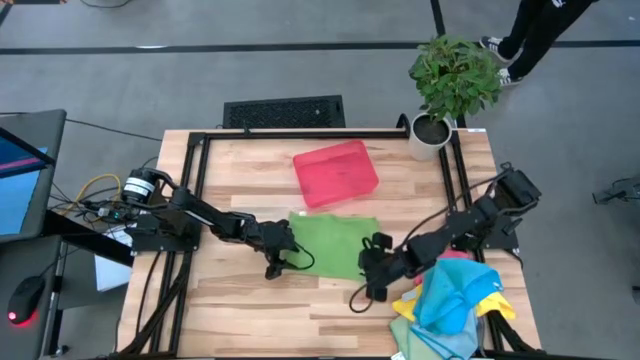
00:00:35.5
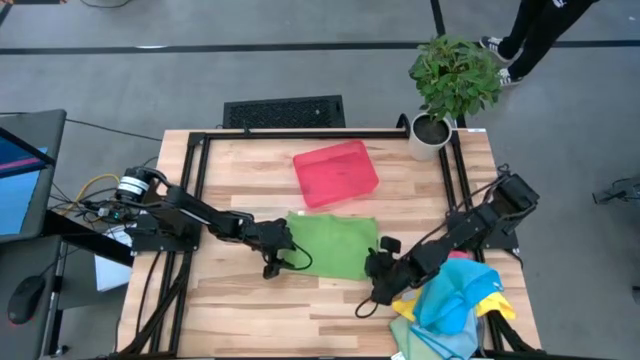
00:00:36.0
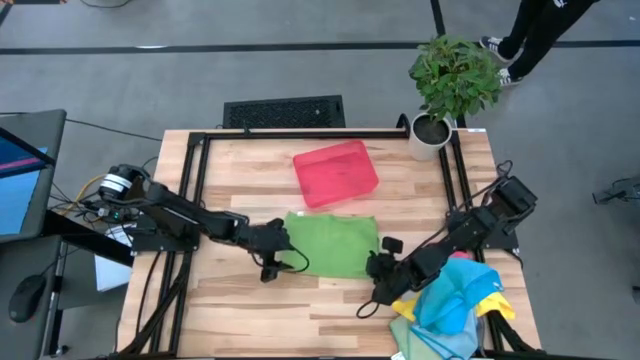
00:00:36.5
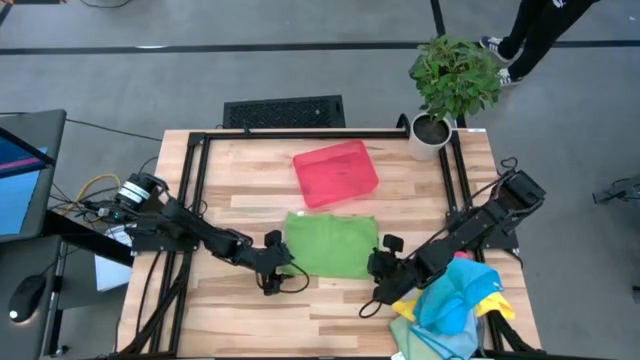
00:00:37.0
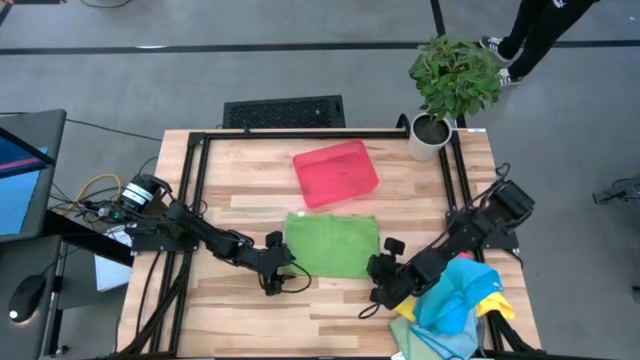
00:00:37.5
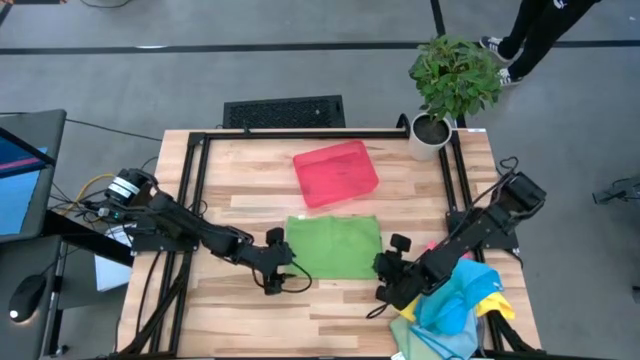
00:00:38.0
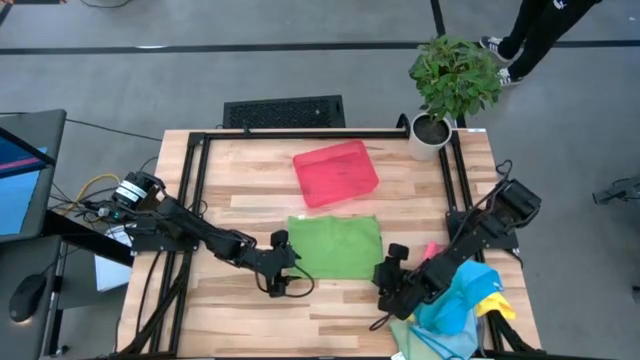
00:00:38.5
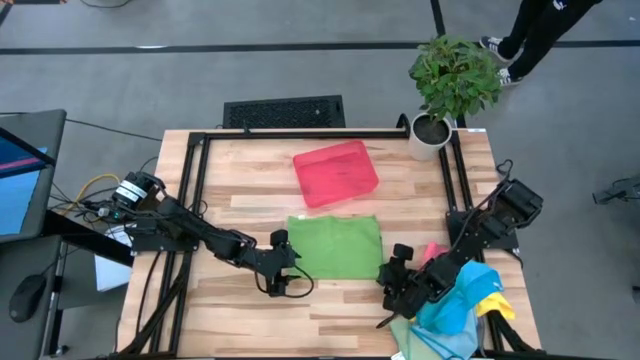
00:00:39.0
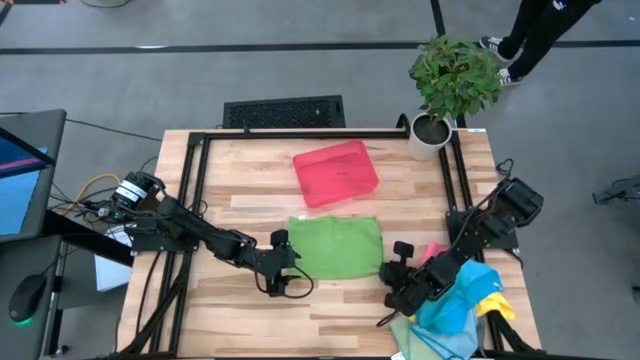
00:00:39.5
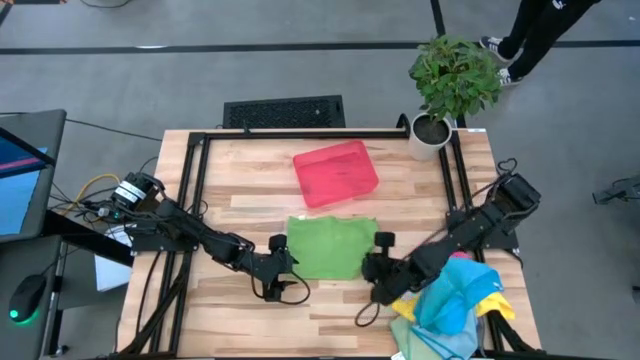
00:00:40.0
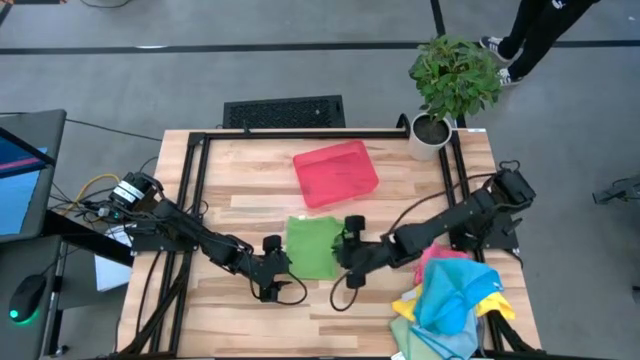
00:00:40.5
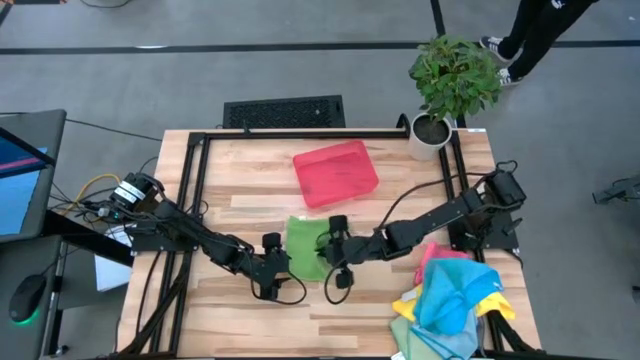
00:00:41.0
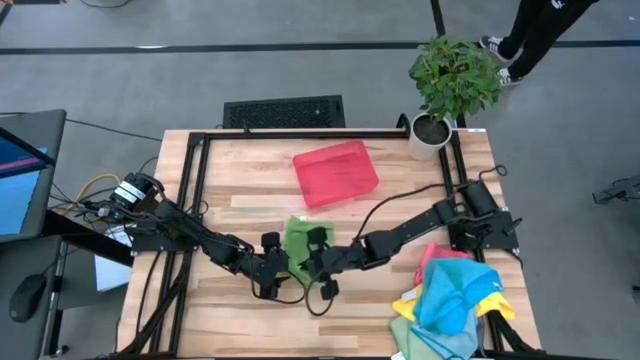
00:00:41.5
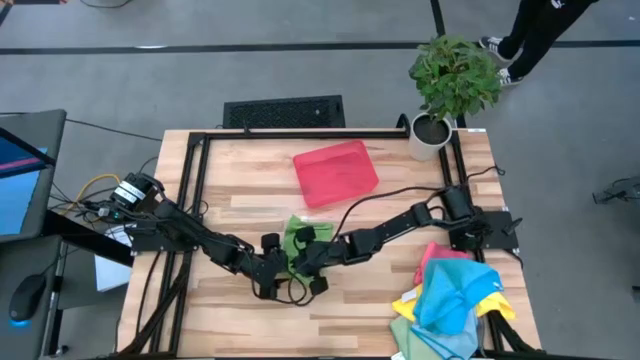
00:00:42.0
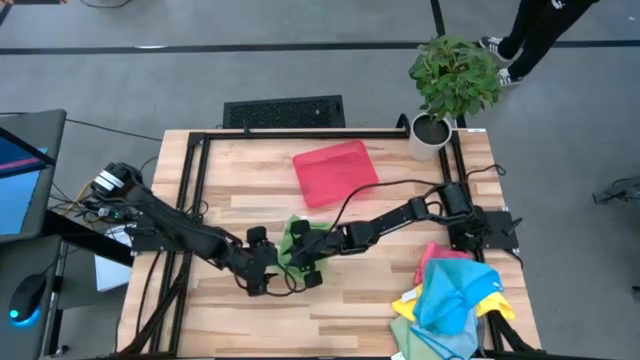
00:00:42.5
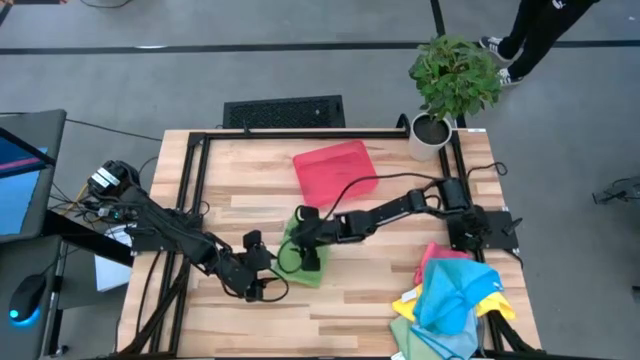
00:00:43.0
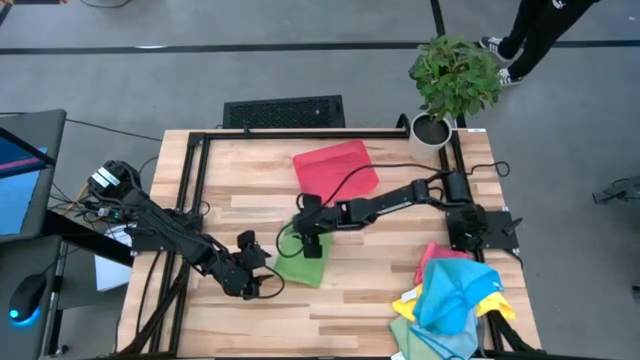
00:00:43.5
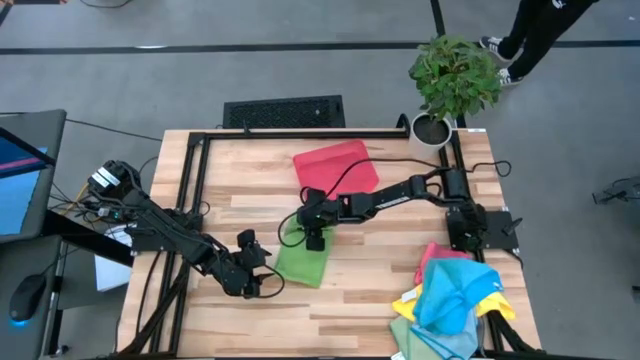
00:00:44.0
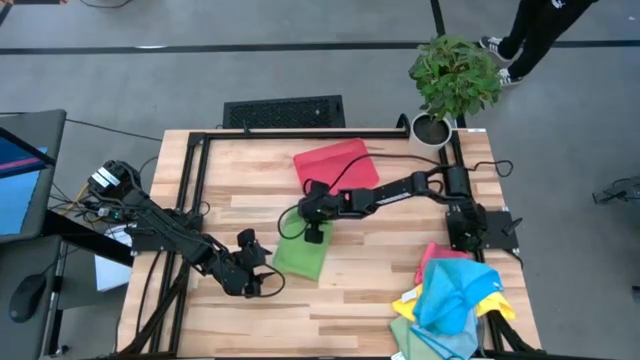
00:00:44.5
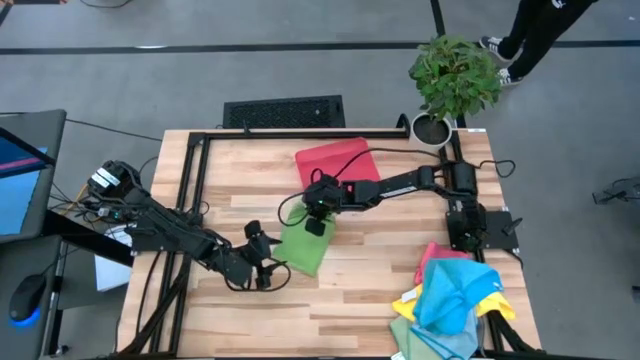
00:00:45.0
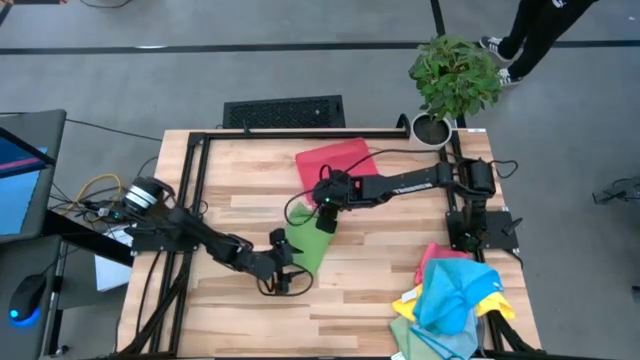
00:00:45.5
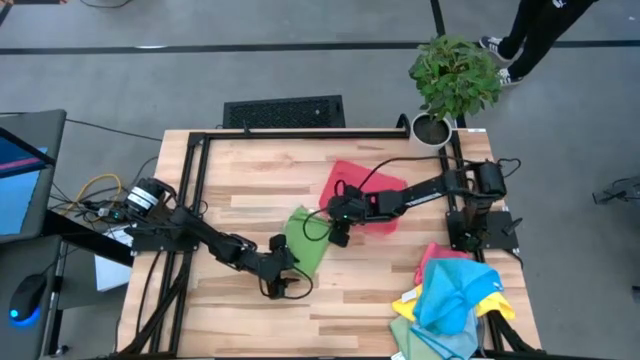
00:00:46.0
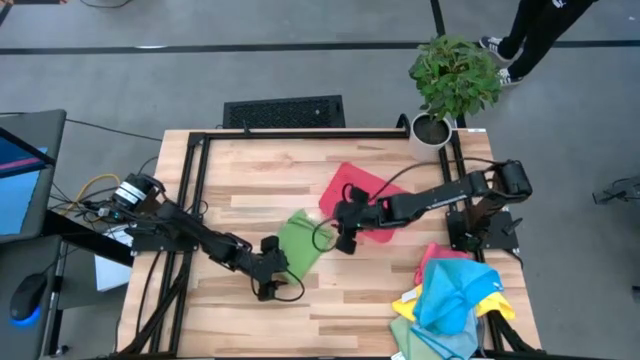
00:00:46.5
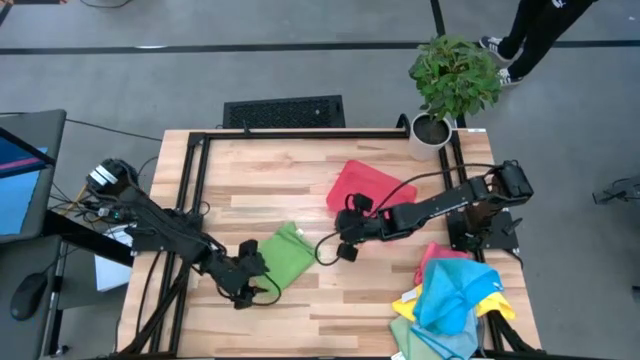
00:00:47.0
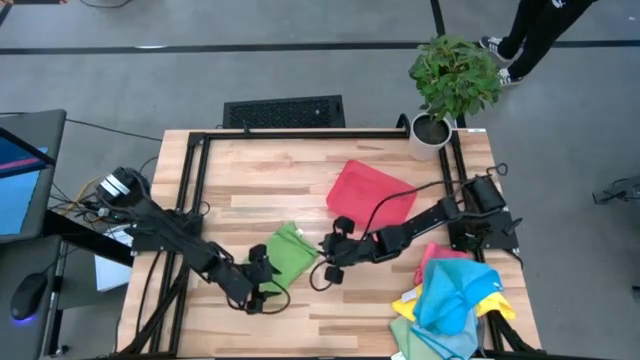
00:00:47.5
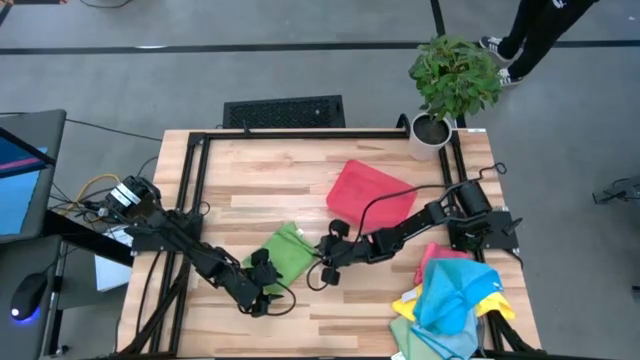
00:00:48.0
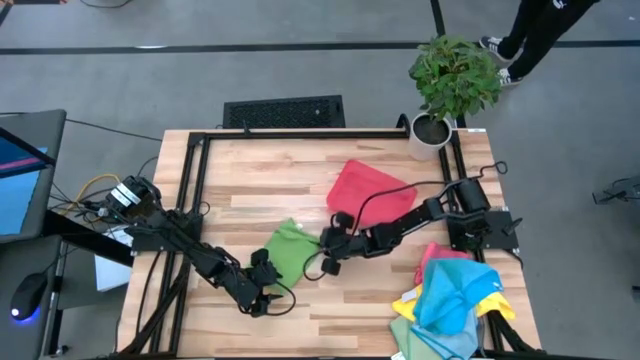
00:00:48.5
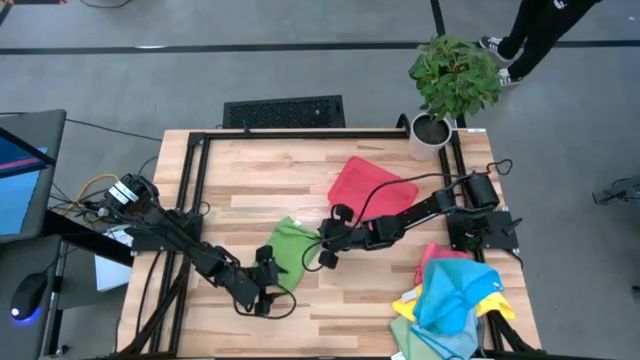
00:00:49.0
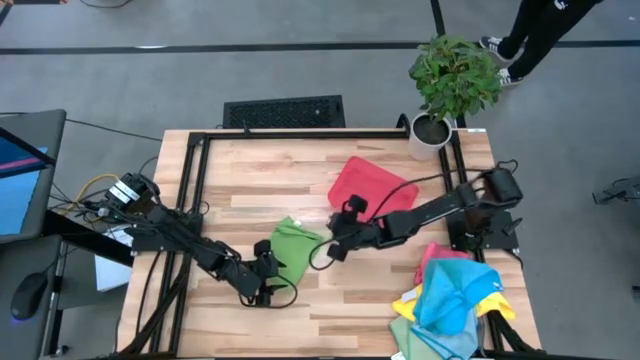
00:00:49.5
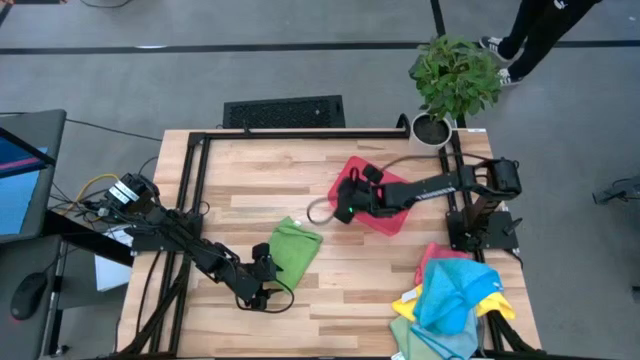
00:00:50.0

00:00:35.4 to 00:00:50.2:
Task: Fold microfiber towels
Fold the green microfiber cloth

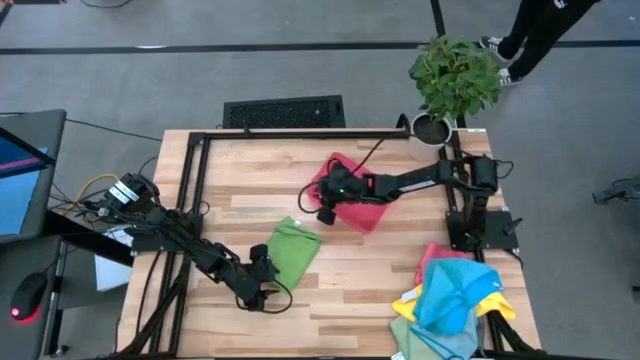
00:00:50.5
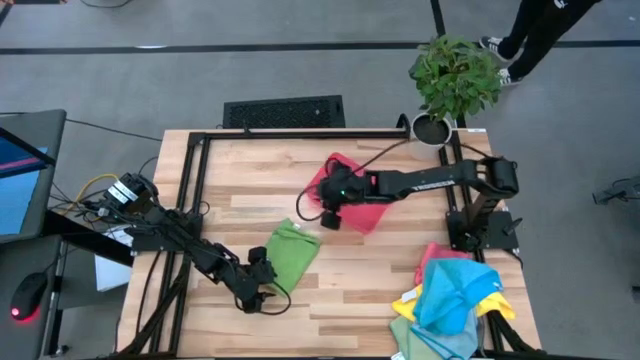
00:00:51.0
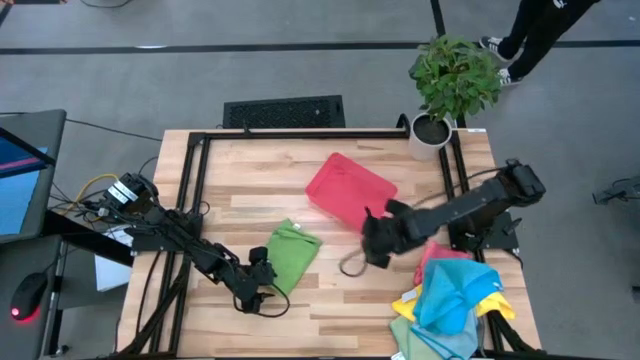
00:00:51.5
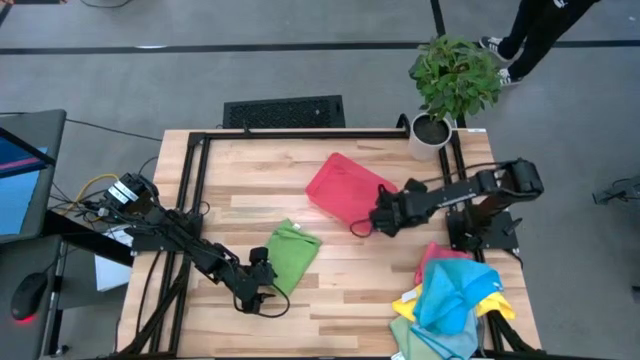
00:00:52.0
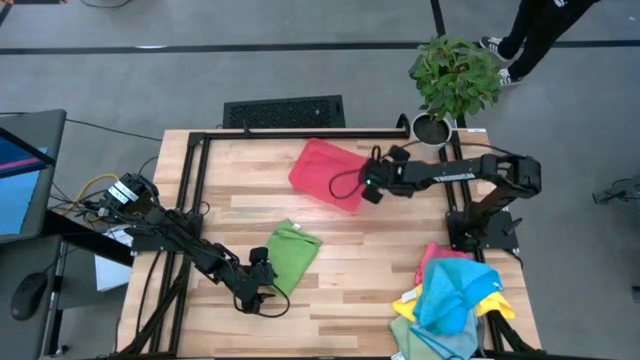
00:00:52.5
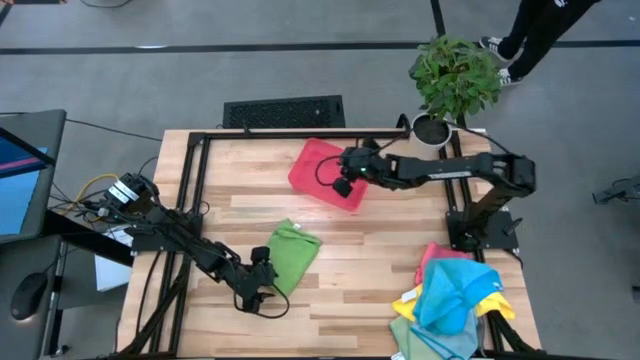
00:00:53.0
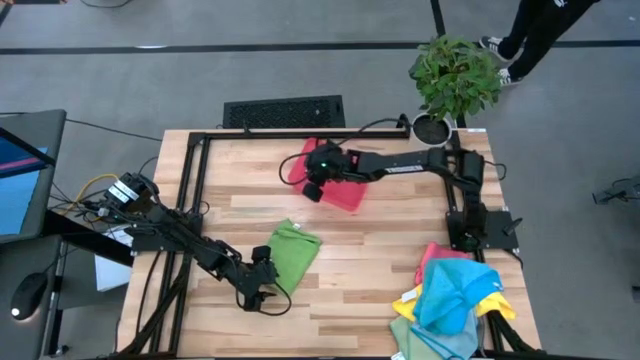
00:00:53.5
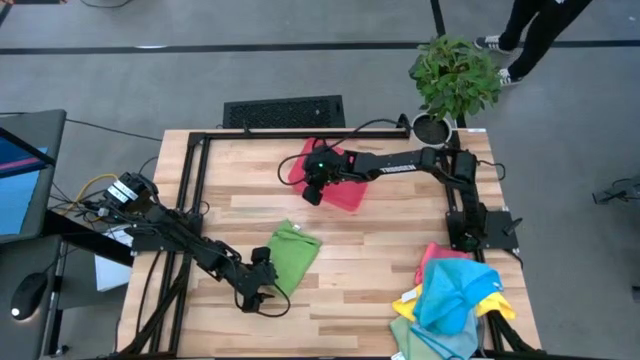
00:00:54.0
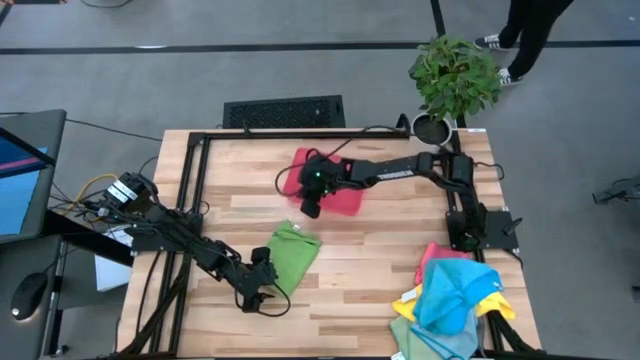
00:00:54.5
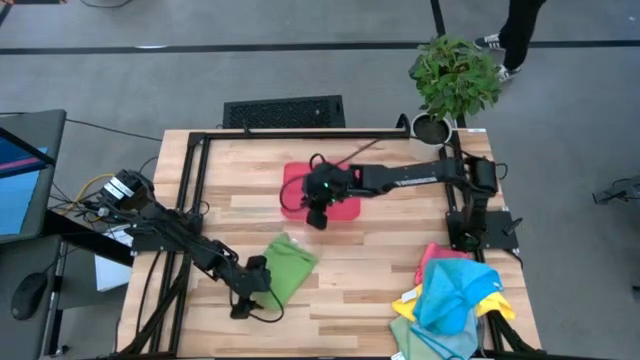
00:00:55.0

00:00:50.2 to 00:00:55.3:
Move the red bin to the center of the table

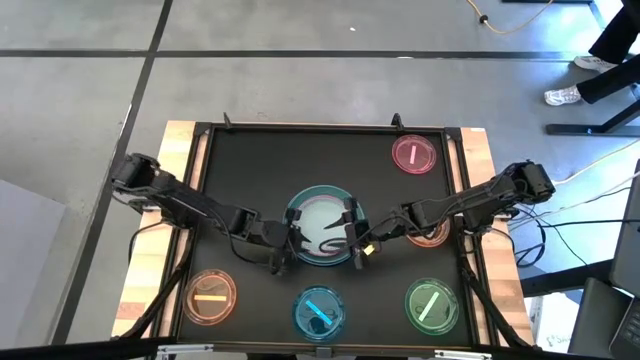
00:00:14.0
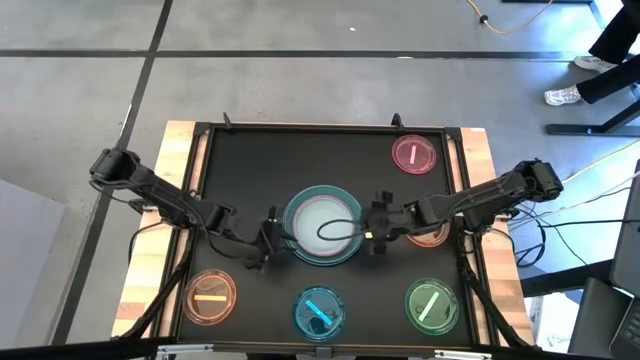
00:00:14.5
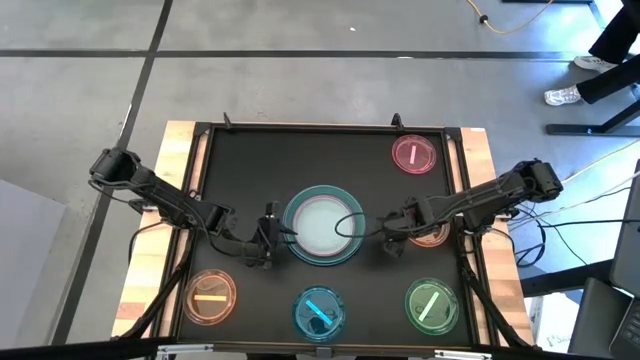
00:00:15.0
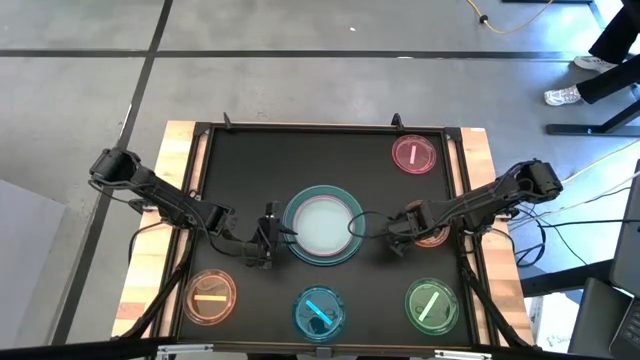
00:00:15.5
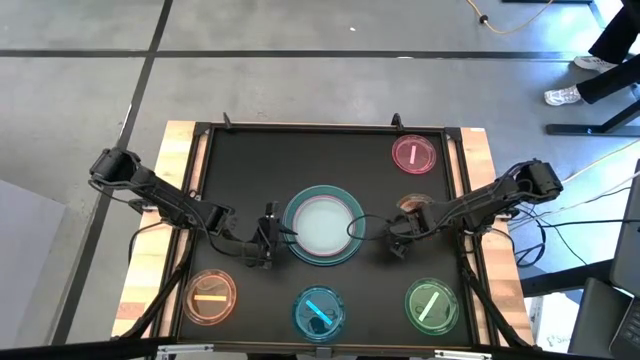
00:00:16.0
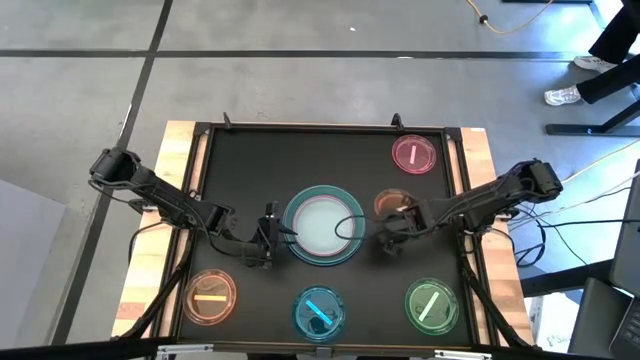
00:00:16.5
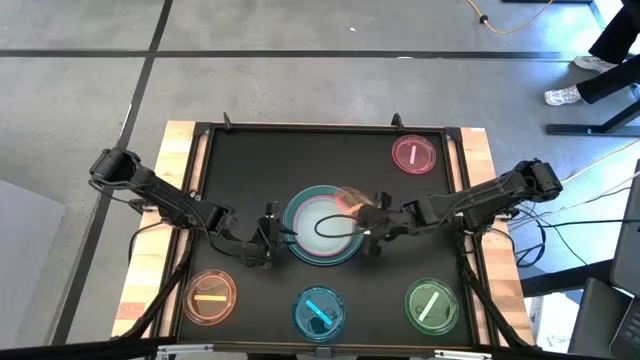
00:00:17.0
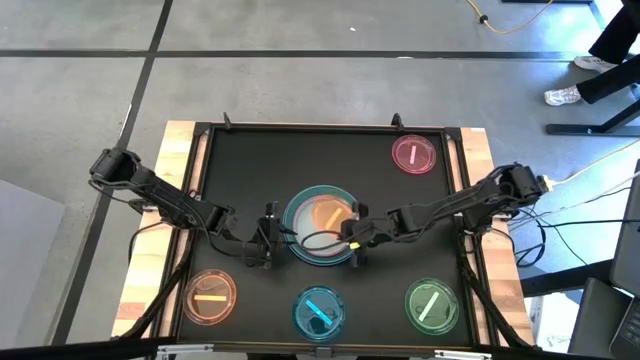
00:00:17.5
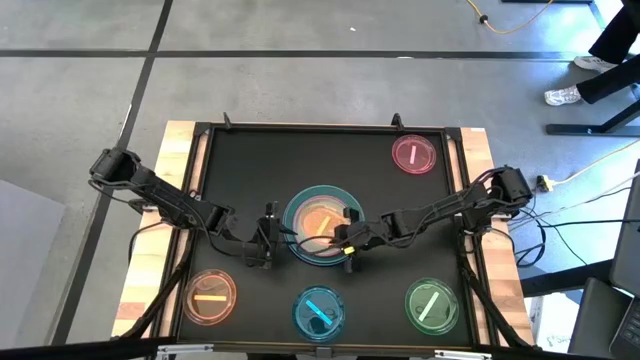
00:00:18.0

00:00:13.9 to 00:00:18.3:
Task: Stack plastic plates
Stack the right orange plate on top of the gray plate
